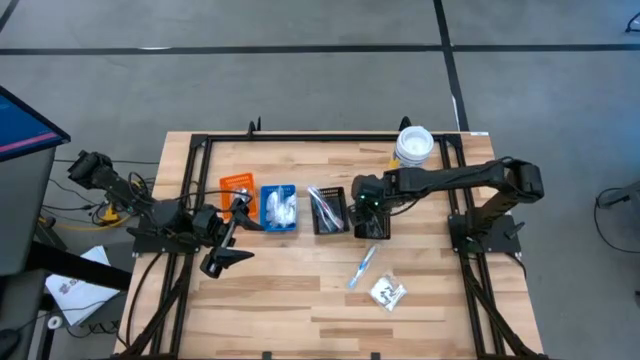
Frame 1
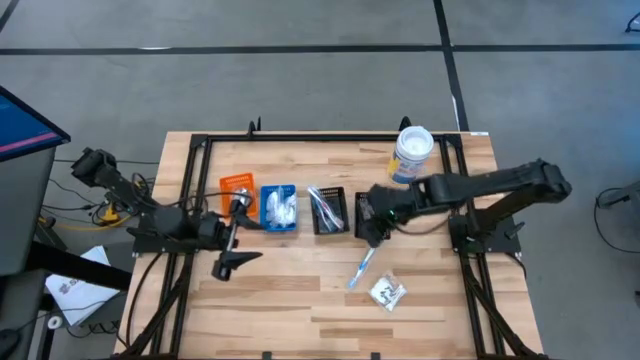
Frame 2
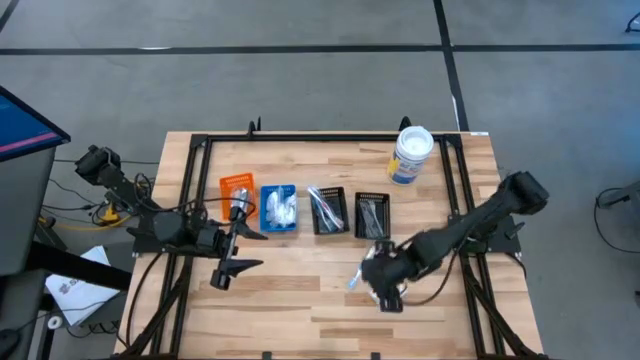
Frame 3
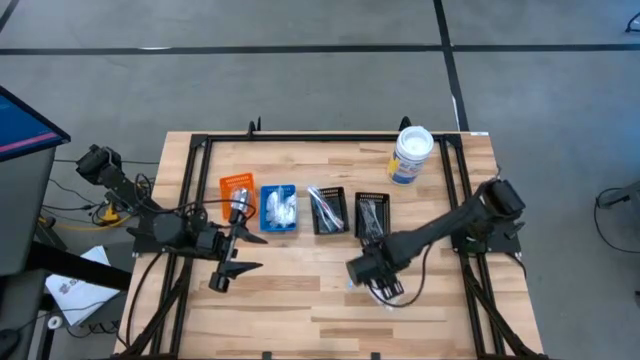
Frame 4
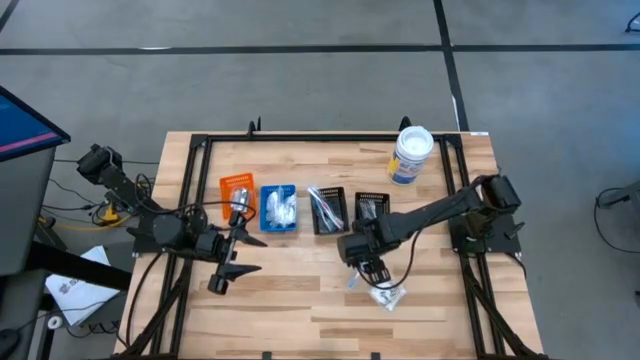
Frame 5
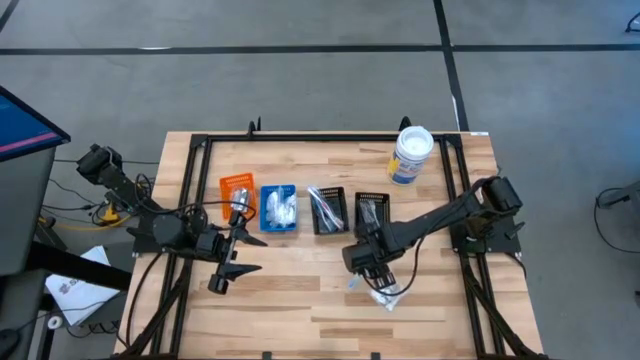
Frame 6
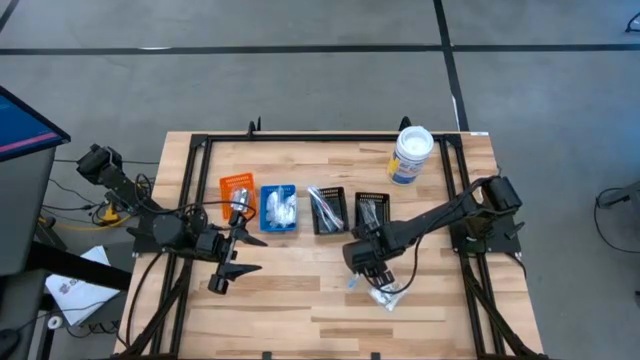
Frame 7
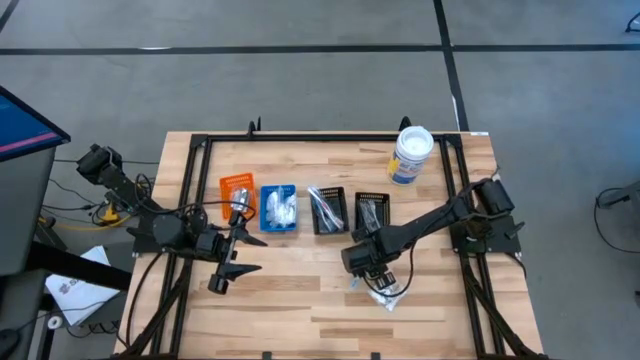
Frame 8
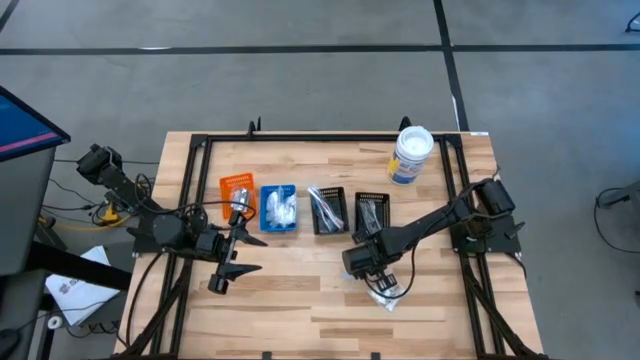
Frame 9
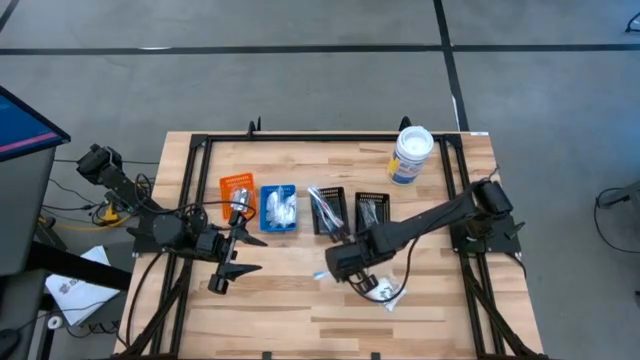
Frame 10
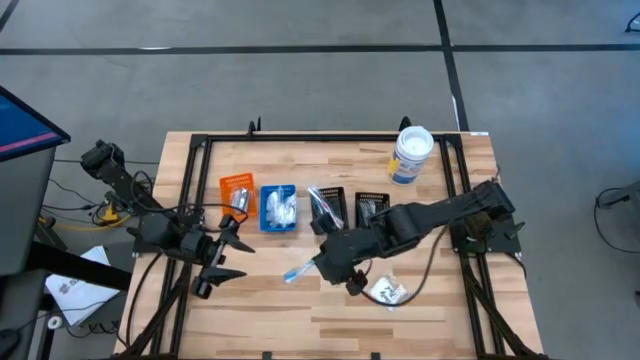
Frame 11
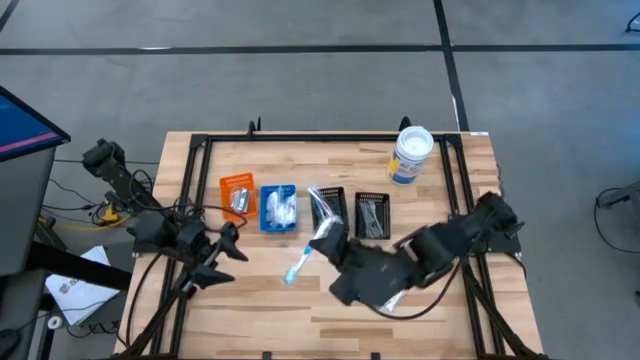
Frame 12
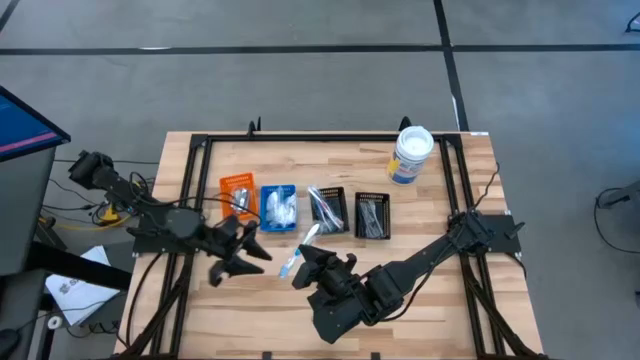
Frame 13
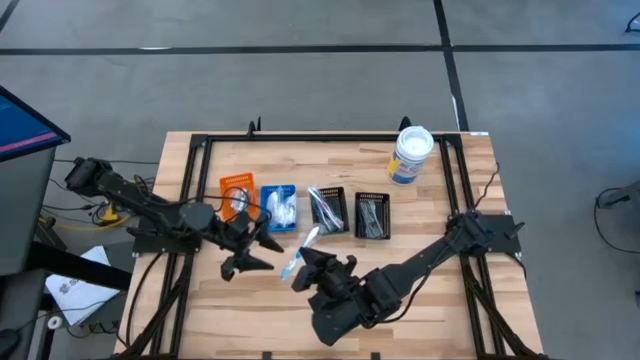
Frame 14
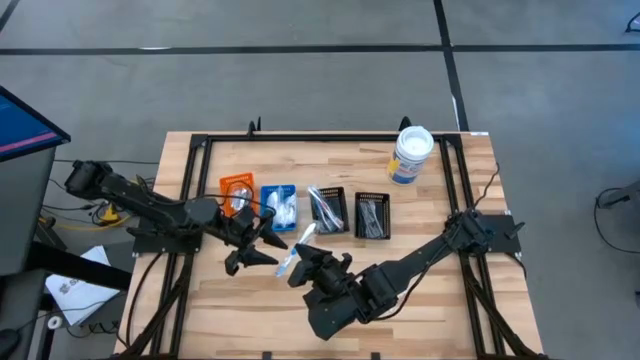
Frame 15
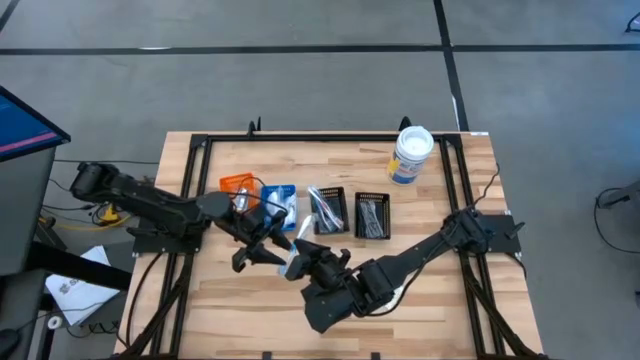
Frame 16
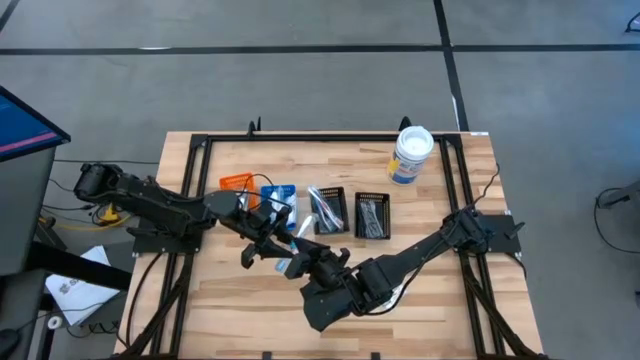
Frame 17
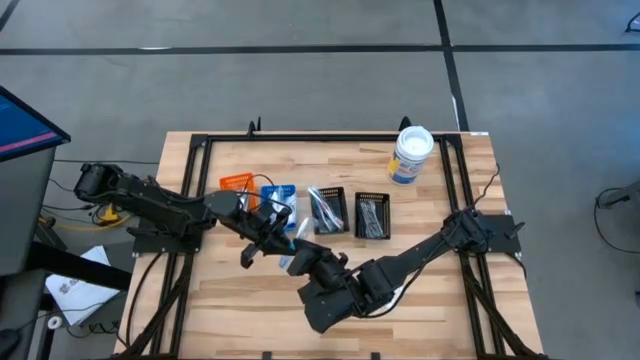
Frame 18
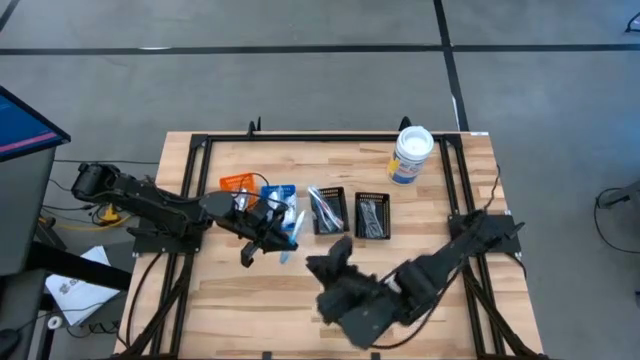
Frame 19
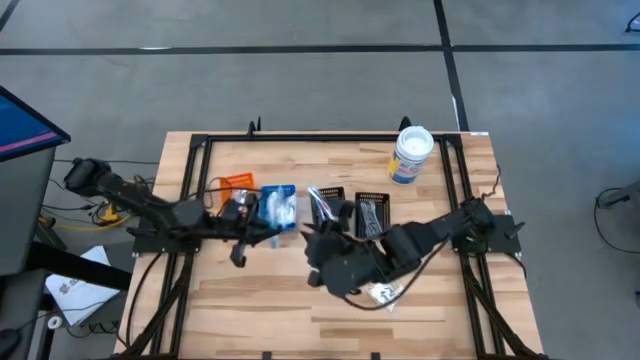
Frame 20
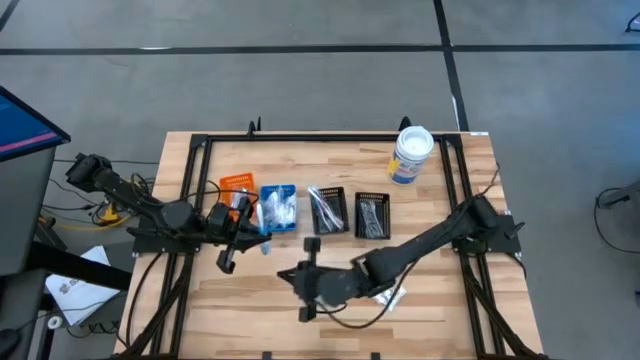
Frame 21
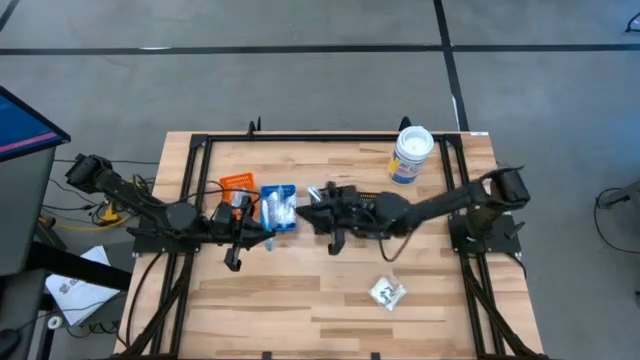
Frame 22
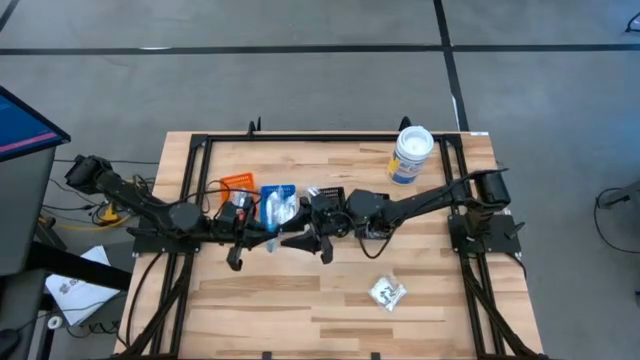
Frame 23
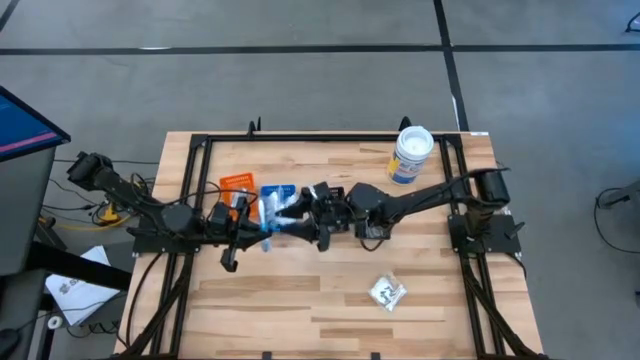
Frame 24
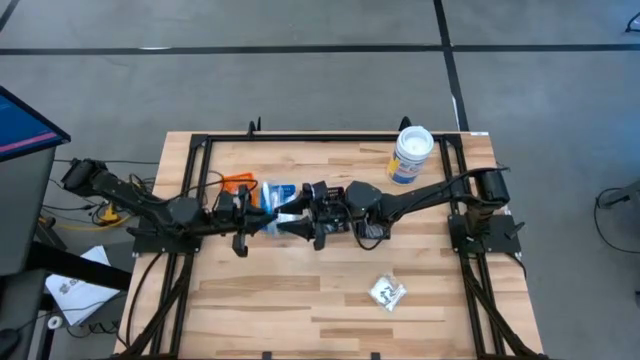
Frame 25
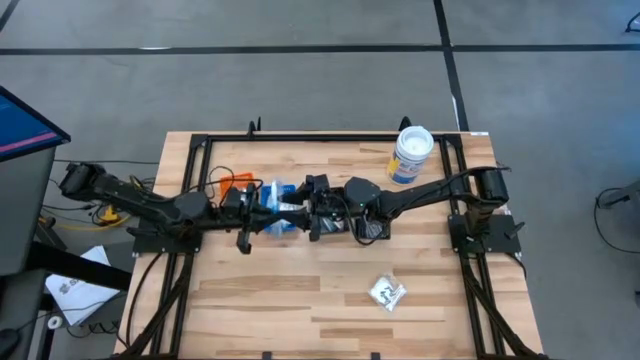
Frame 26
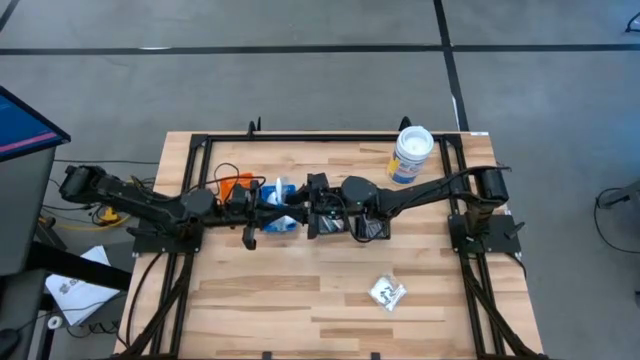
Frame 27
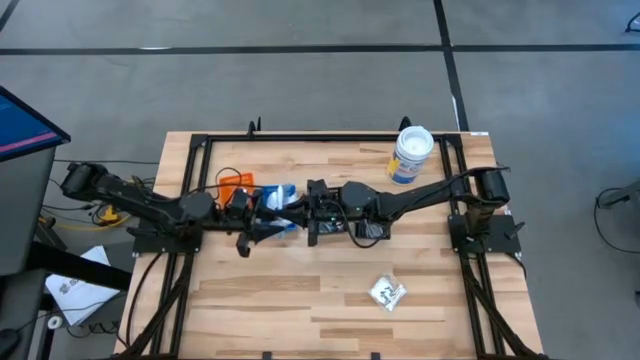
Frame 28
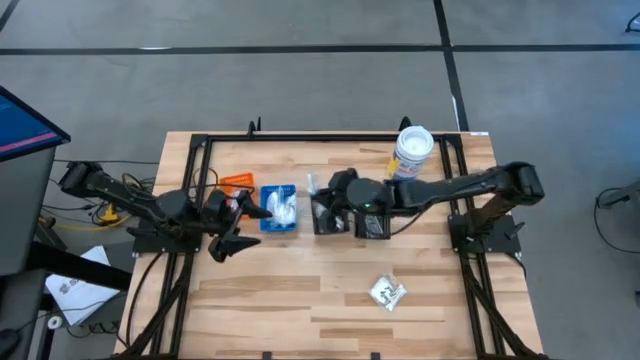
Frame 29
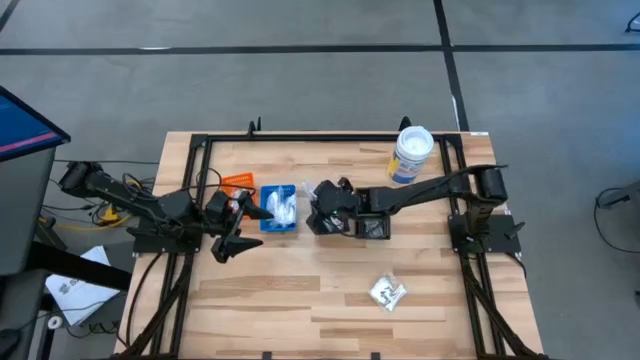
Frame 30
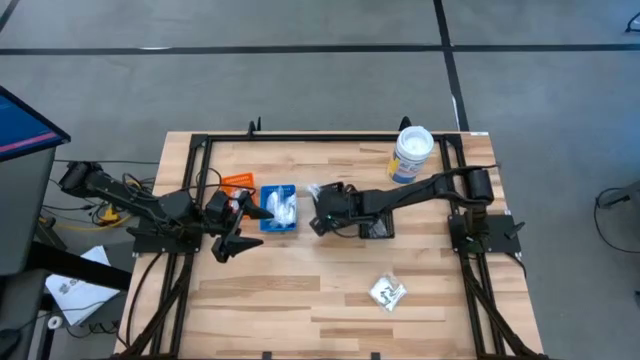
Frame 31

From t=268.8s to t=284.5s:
Task: Pick & Place Travel size toiletries
Put the blue toothbrush into the left black bin

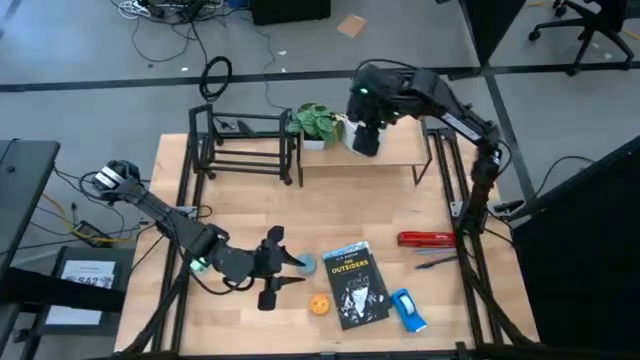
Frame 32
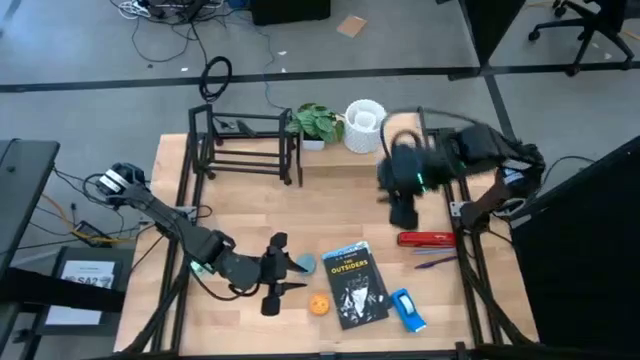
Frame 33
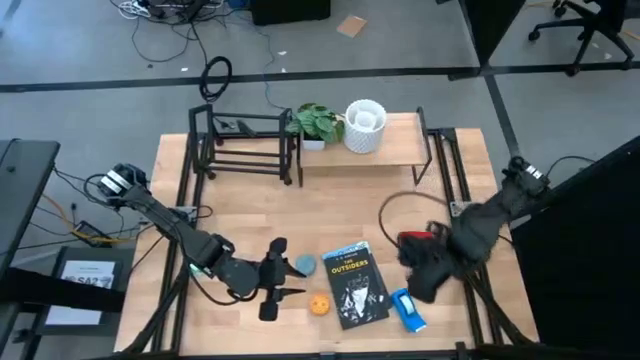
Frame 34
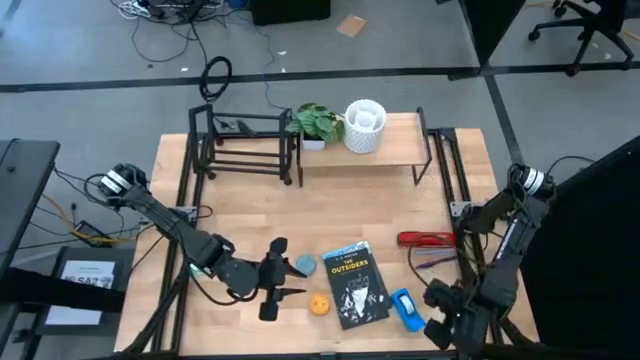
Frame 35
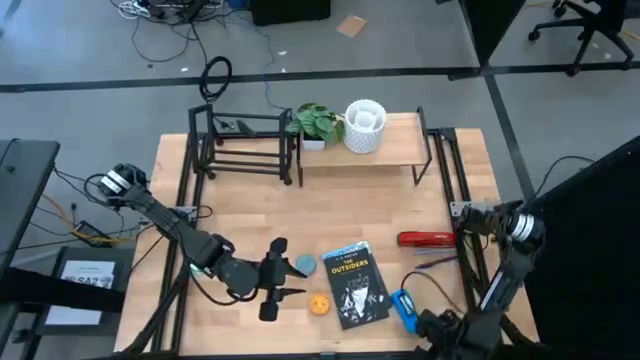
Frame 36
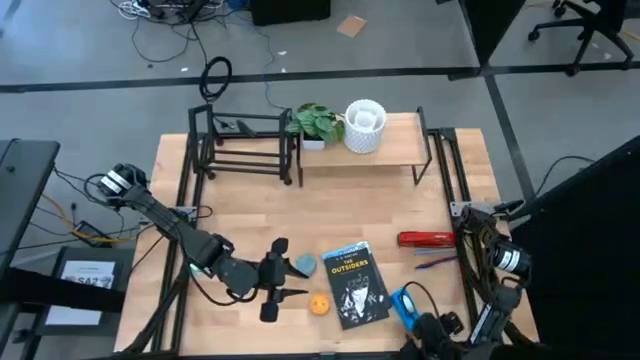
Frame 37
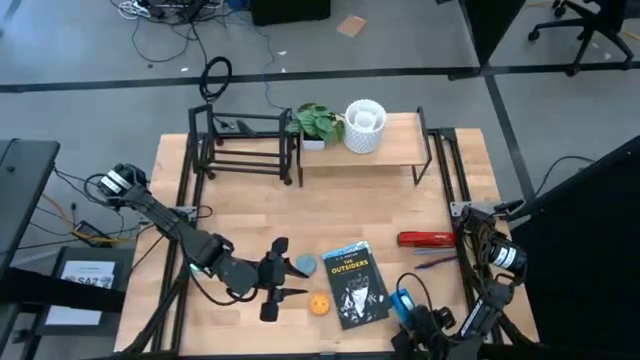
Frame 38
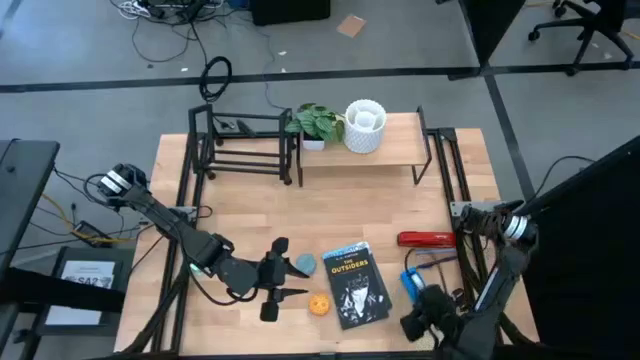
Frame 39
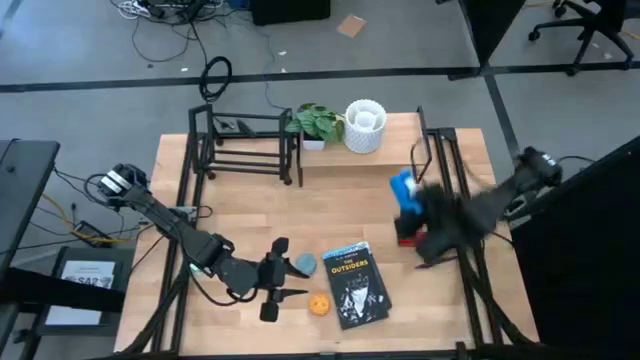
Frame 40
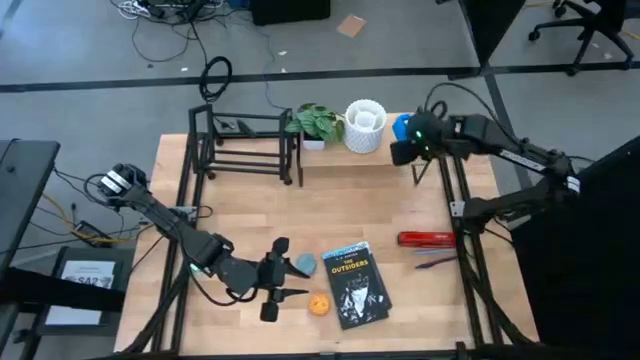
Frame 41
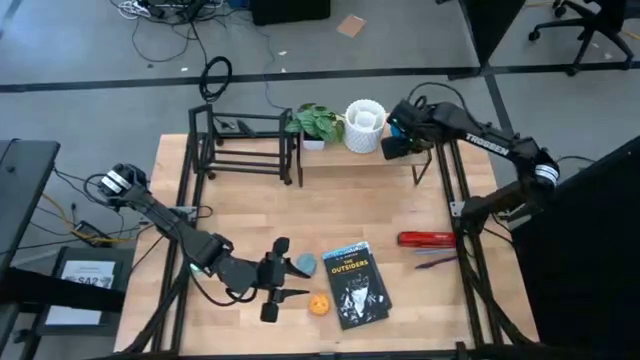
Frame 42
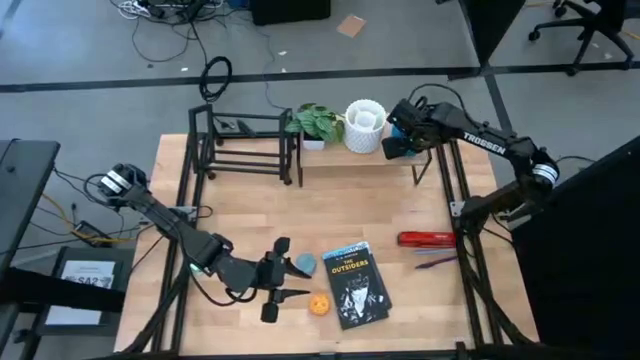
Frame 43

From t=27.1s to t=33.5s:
Task: Stock shelves
Put the blue tape dispenser on the shelf
